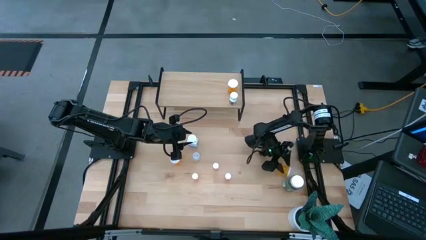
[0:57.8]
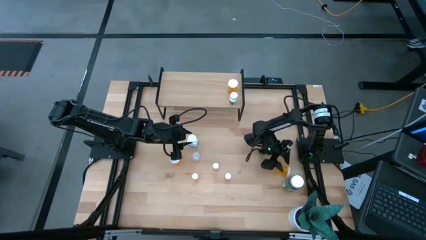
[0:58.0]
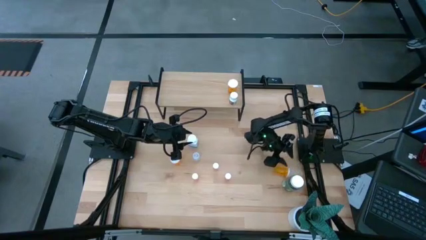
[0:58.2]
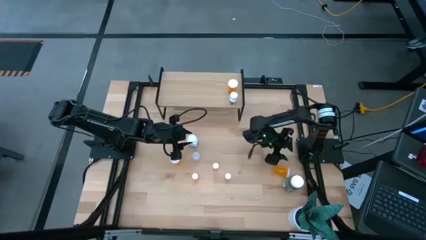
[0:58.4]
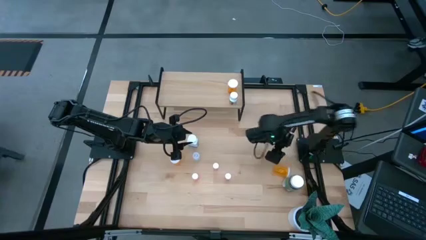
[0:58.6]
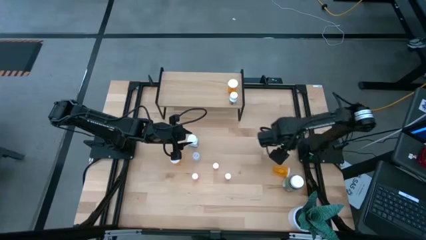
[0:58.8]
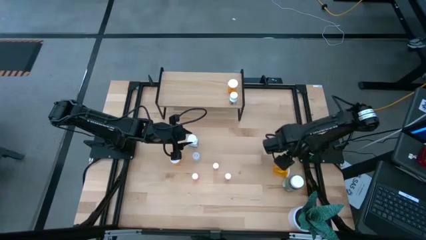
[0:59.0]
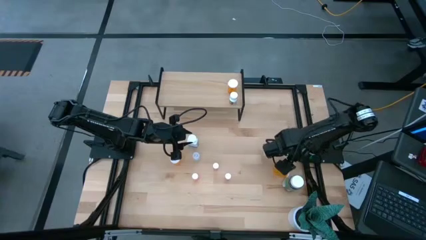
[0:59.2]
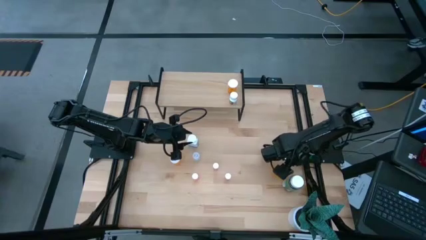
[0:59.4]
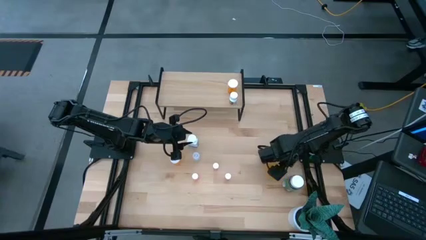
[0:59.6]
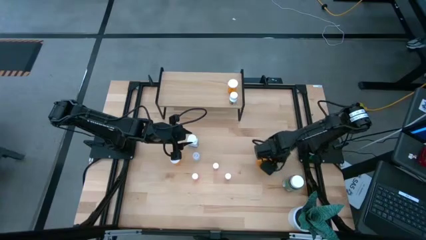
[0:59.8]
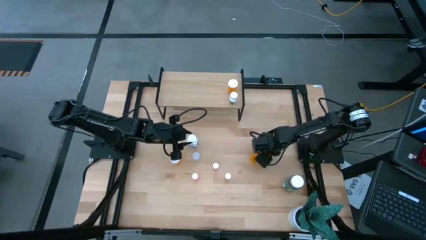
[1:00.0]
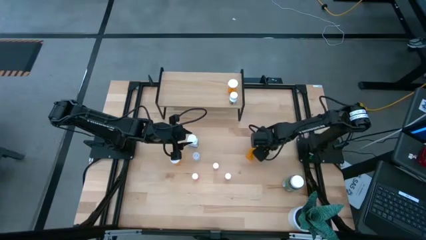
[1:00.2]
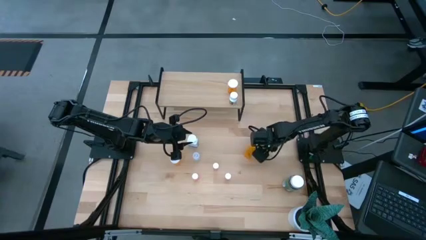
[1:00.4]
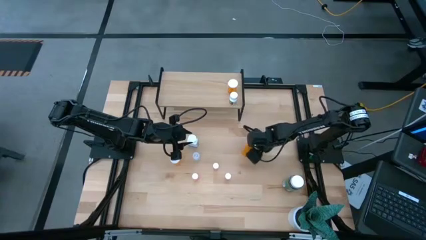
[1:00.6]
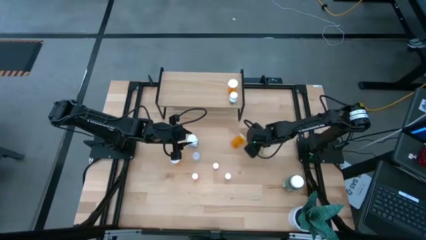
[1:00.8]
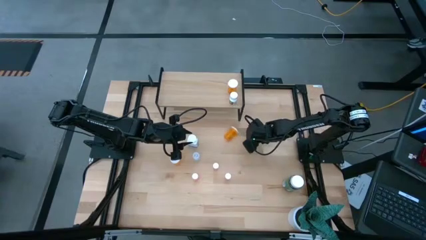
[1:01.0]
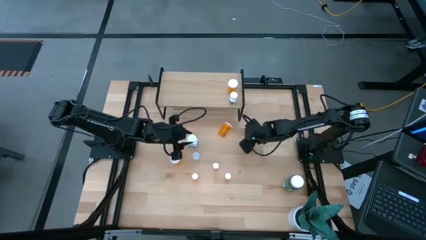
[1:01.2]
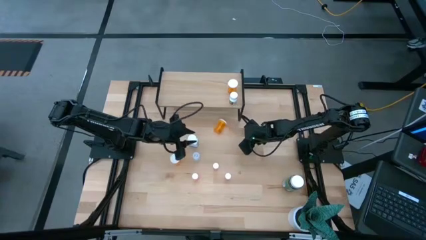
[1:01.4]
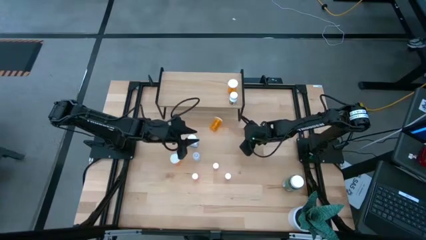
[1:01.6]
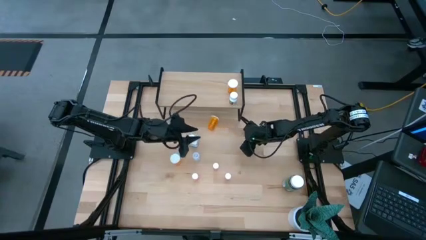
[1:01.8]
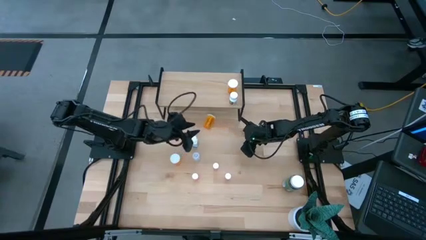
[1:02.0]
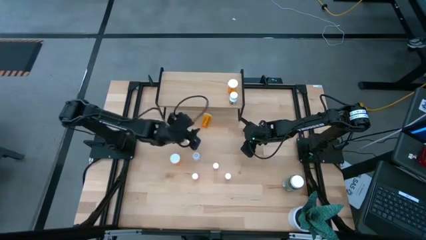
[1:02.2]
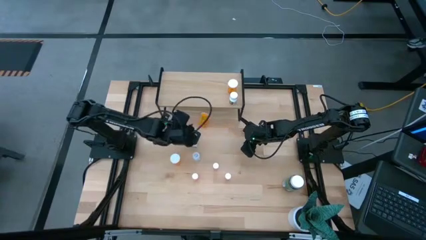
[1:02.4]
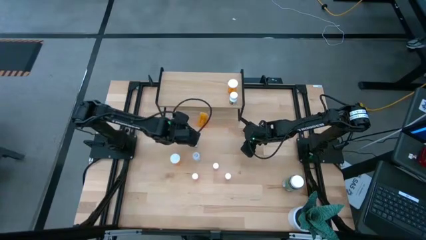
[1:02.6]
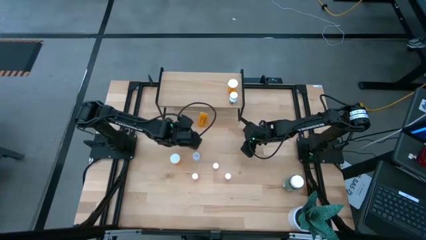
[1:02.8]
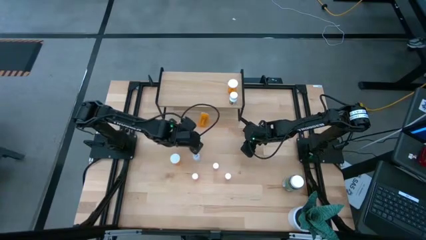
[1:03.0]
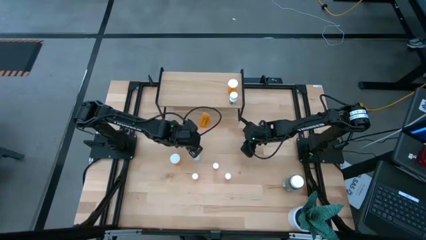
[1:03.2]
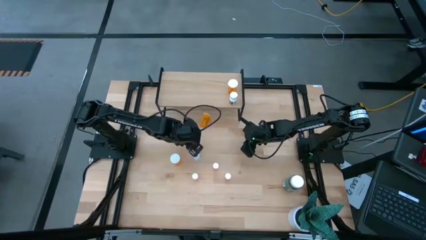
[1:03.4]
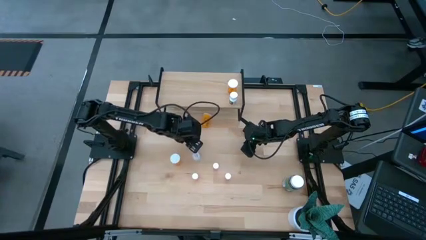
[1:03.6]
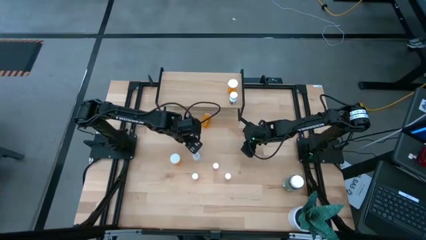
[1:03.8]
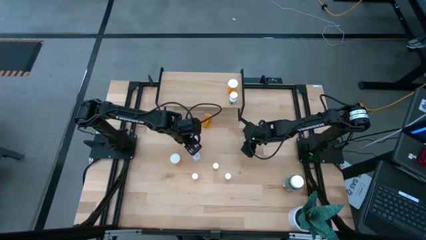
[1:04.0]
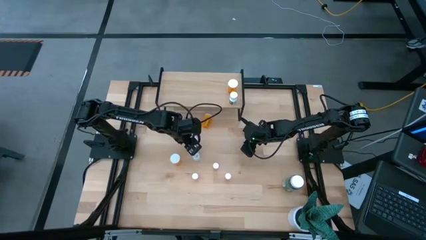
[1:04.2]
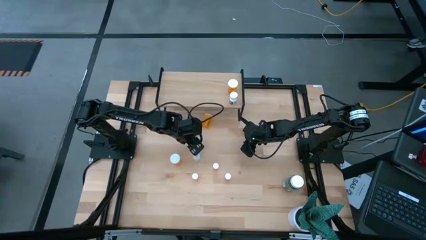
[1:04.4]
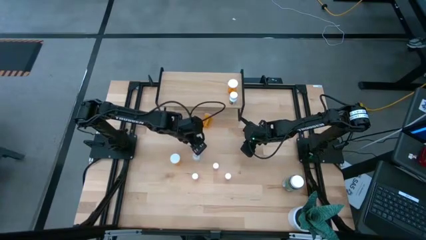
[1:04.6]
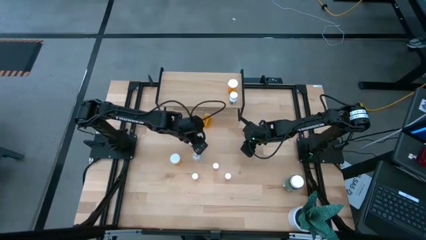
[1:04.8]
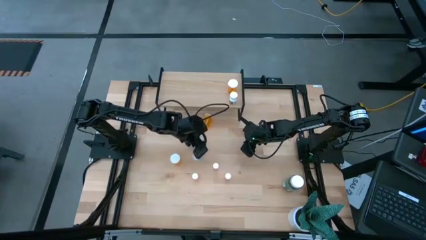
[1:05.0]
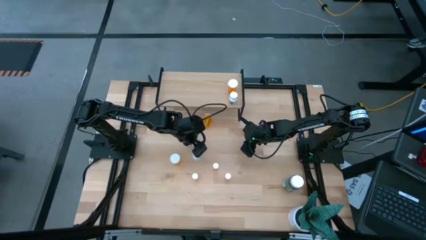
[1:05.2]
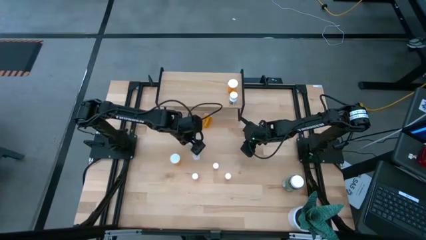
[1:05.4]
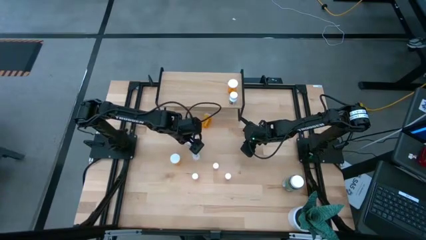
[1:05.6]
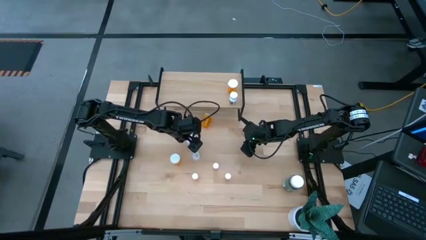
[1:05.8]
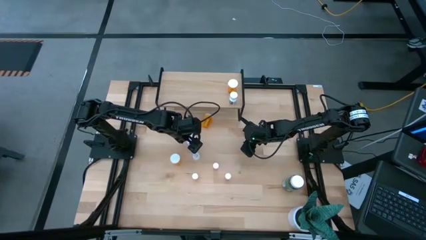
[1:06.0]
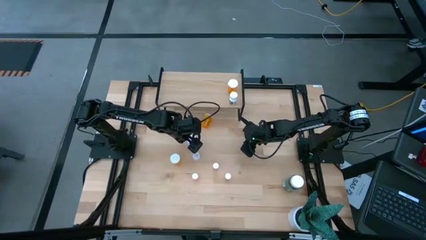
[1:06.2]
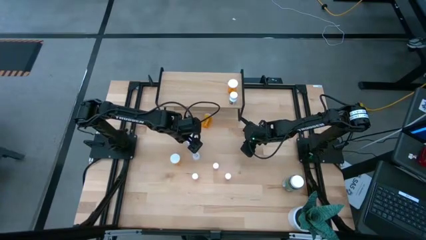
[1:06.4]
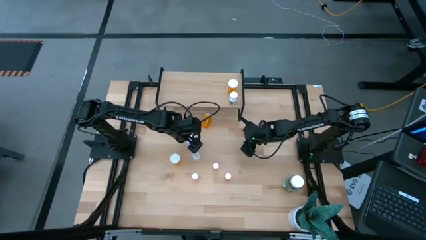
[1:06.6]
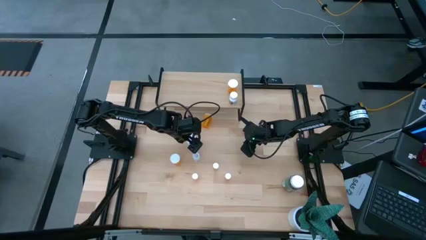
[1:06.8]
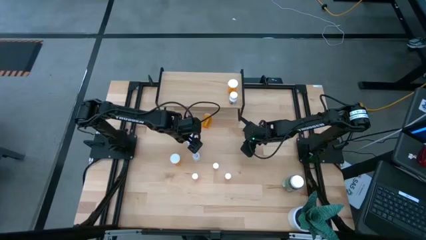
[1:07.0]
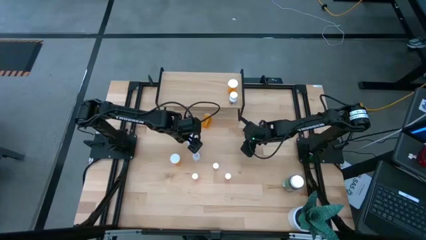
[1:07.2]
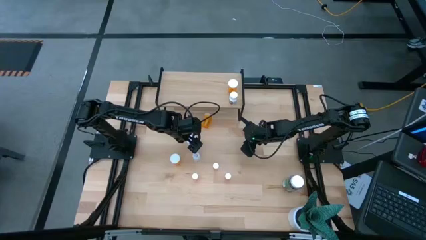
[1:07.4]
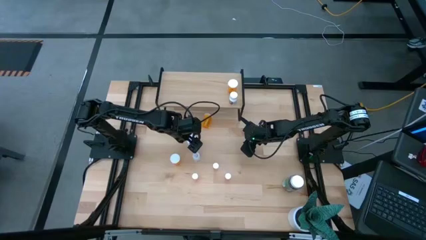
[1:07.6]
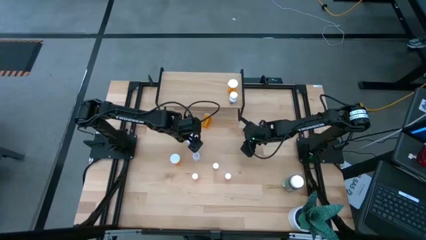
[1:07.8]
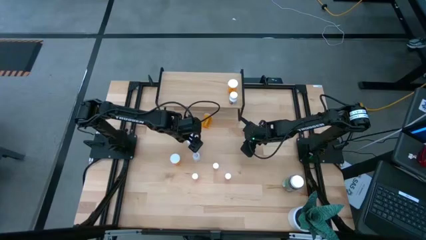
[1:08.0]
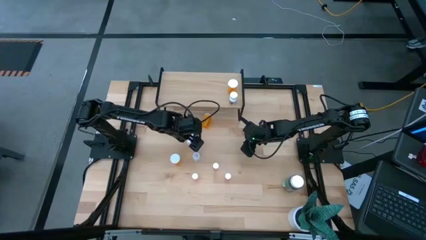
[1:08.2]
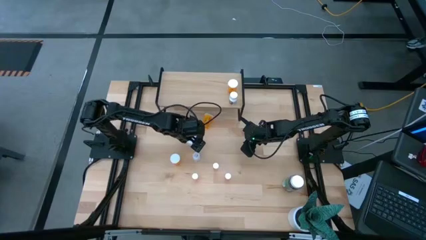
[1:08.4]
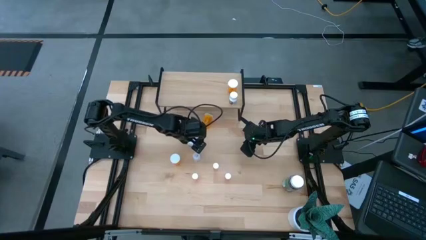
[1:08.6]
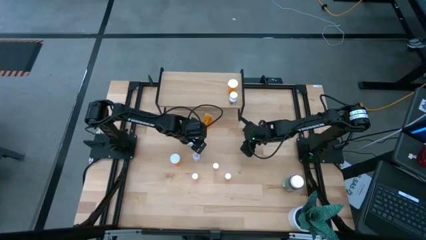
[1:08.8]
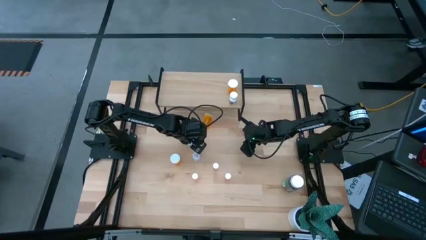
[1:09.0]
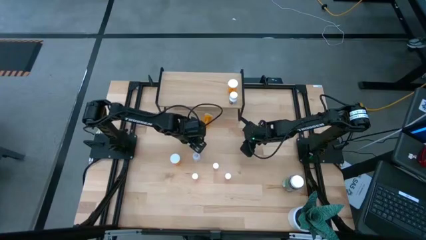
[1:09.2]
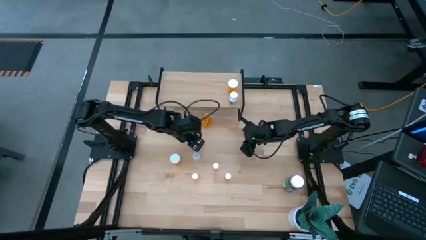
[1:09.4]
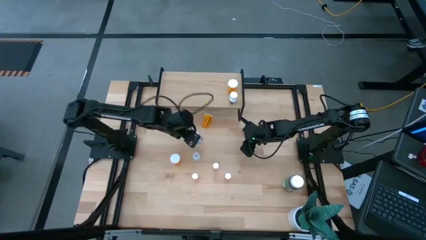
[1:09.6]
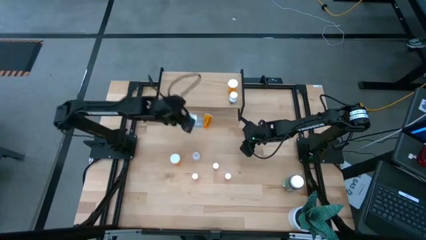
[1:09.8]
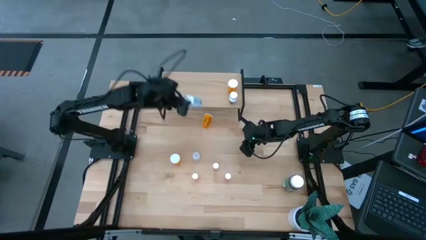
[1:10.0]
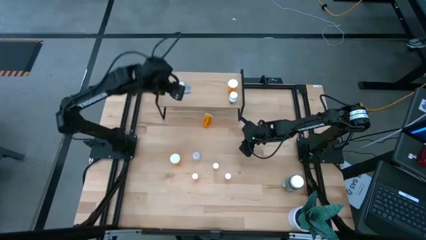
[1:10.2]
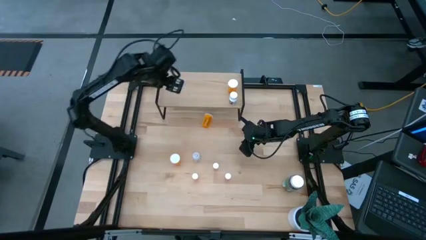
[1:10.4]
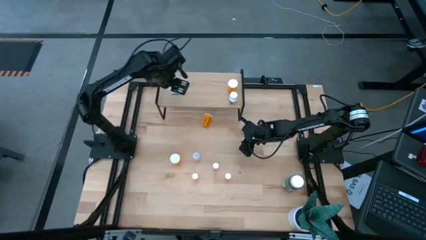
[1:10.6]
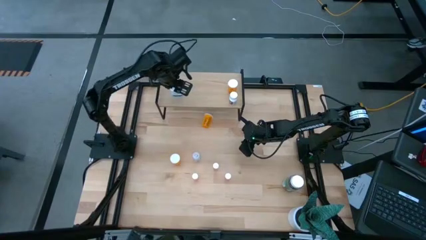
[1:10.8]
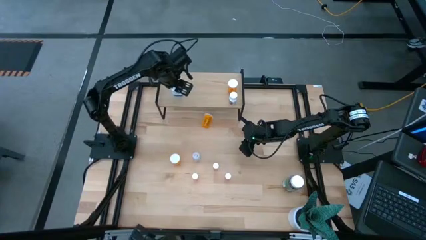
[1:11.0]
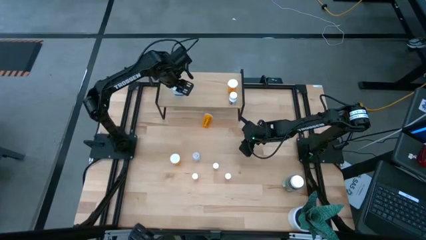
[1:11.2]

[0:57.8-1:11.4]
Task: Pick and place medicine bottles onto shelf by color
Put the blue pill bottle on the shelf

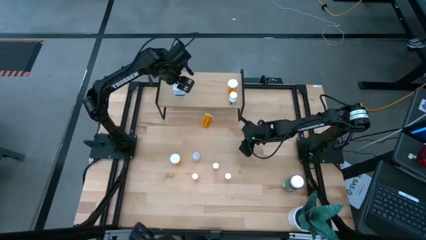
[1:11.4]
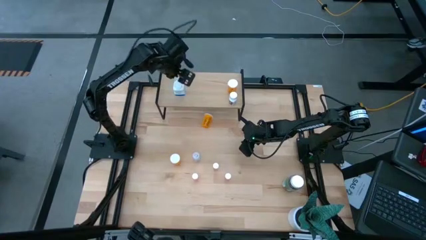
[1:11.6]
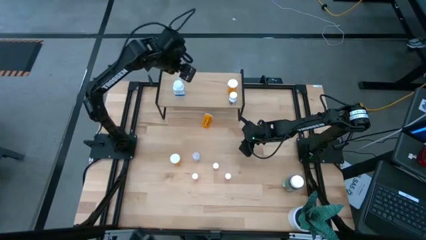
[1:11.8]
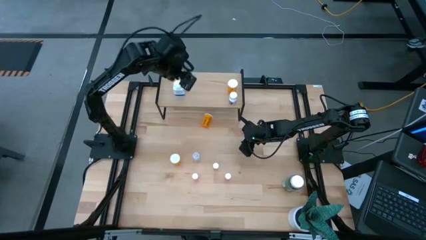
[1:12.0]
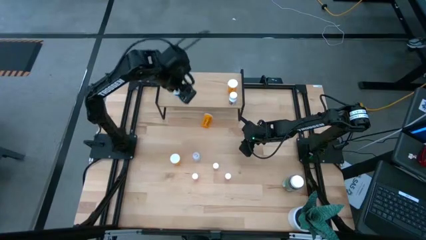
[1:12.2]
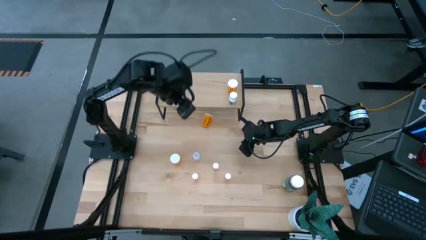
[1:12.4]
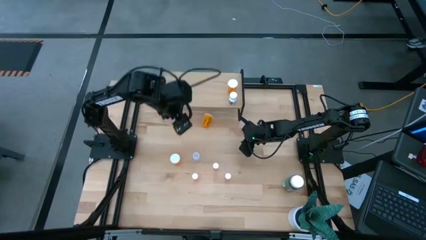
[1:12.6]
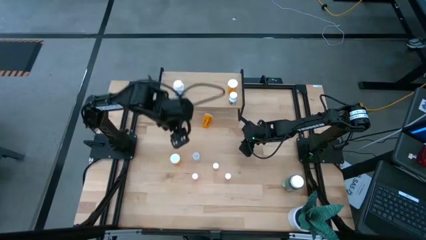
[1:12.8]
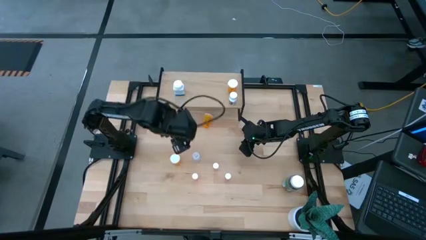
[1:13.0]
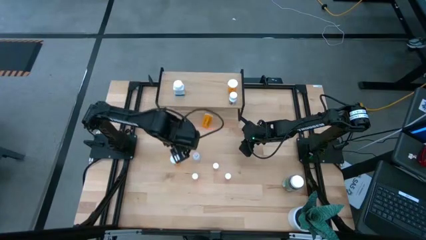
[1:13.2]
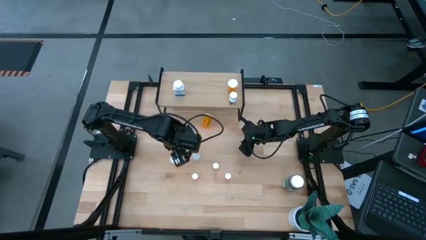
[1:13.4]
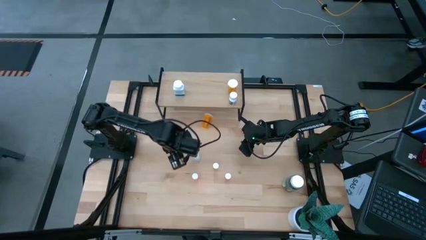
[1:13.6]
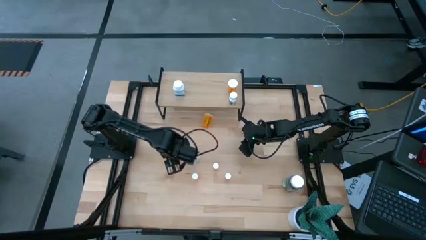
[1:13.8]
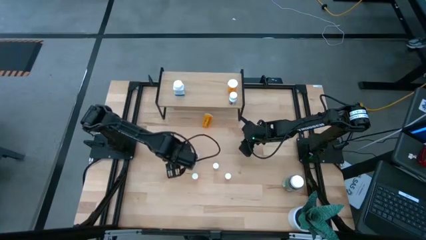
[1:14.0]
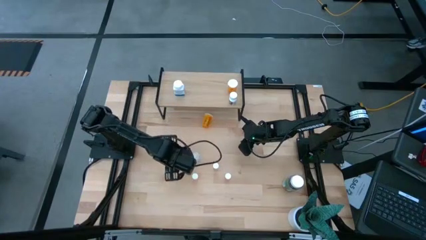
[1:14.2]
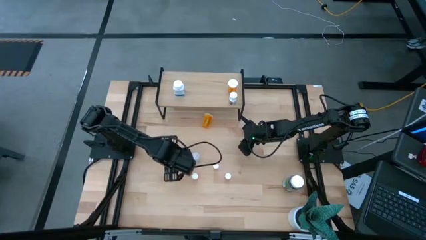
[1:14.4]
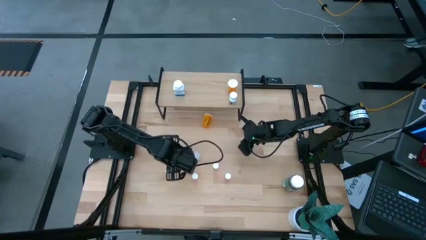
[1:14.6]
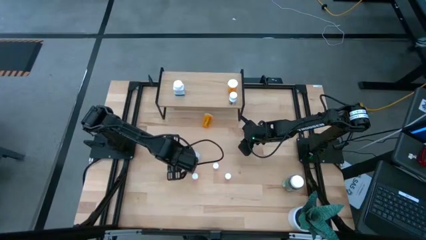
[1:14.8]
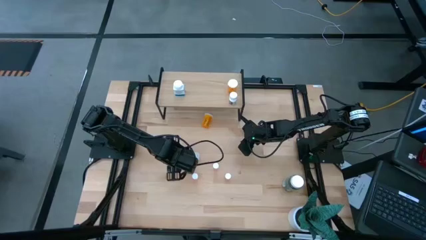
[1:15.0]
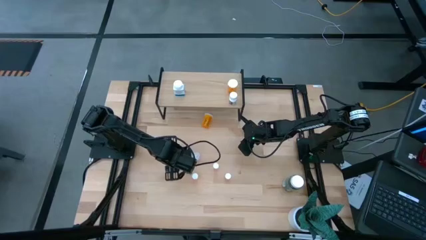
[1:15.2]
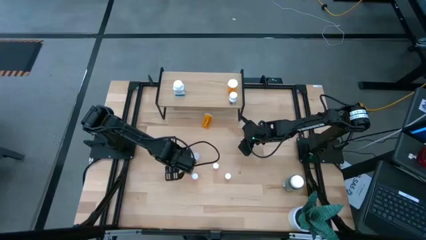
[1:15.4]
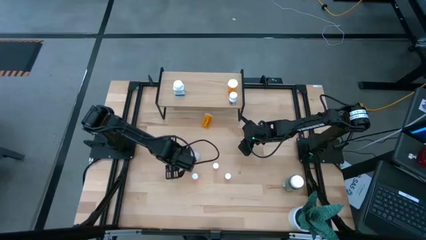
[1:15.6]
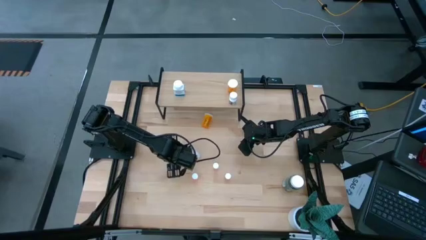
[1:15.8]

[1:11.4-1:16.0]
Put the bottom orange pill bottle on the shelf
